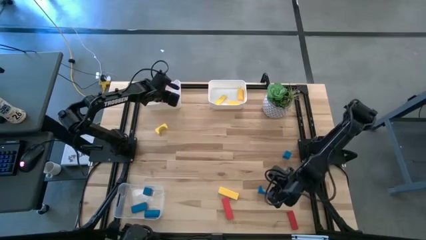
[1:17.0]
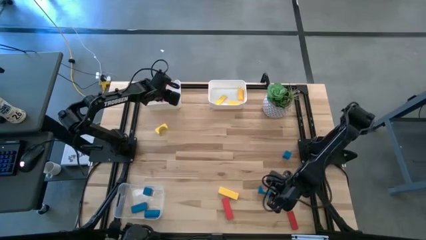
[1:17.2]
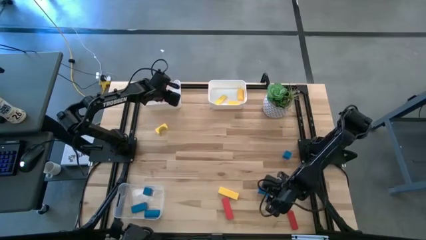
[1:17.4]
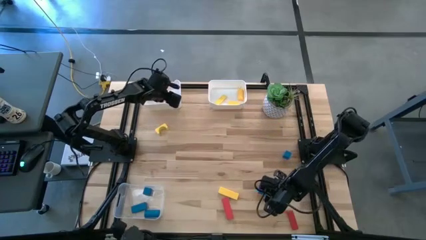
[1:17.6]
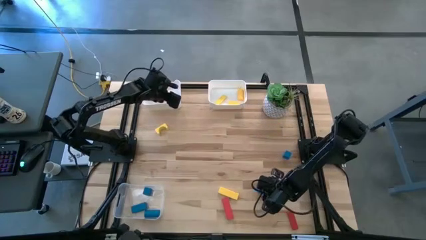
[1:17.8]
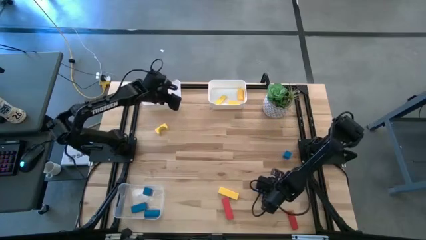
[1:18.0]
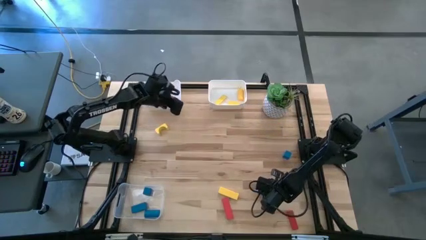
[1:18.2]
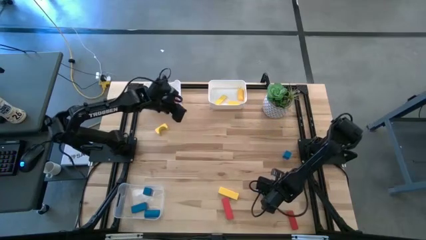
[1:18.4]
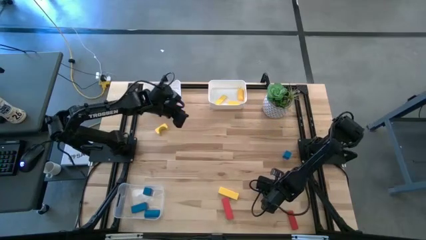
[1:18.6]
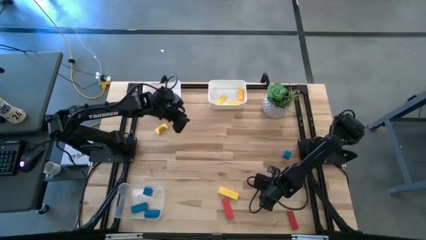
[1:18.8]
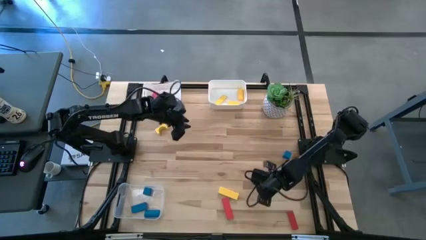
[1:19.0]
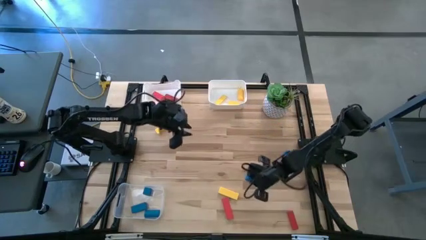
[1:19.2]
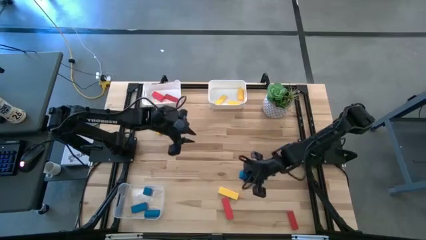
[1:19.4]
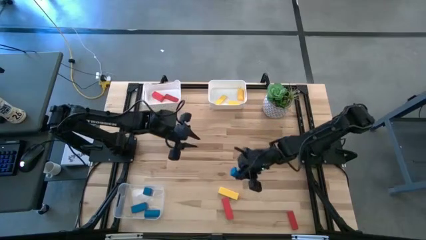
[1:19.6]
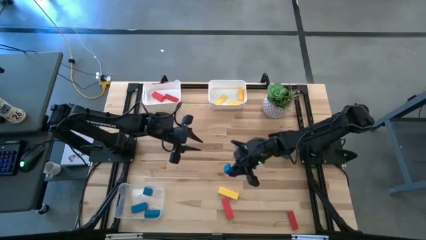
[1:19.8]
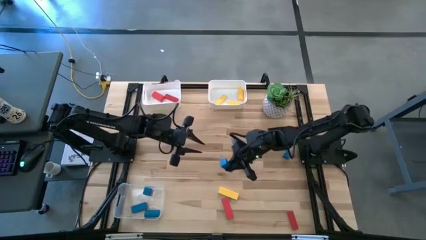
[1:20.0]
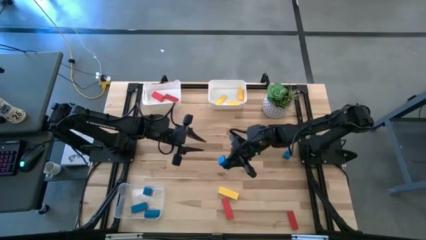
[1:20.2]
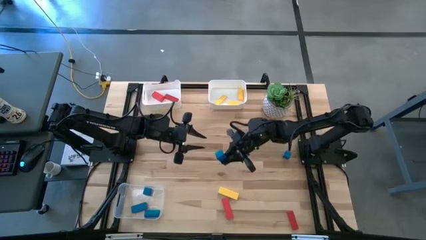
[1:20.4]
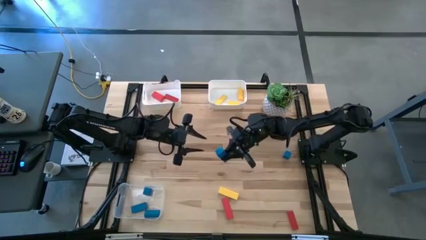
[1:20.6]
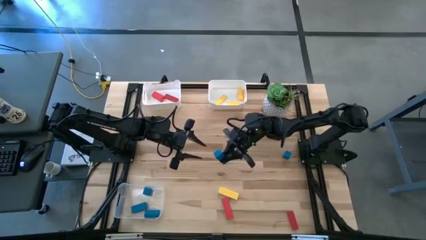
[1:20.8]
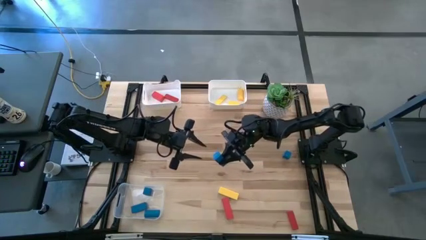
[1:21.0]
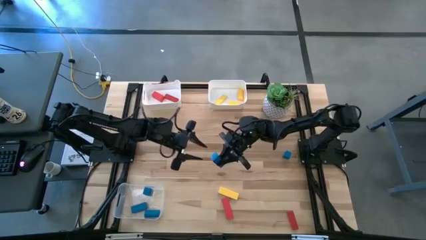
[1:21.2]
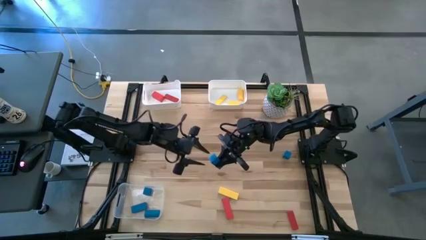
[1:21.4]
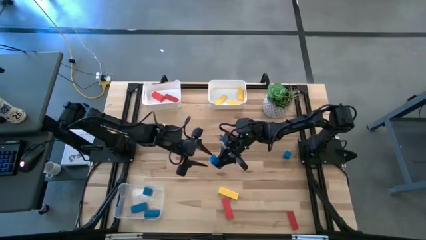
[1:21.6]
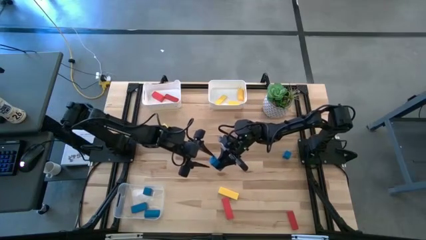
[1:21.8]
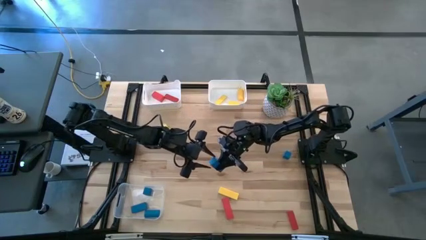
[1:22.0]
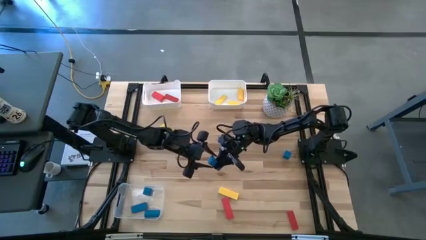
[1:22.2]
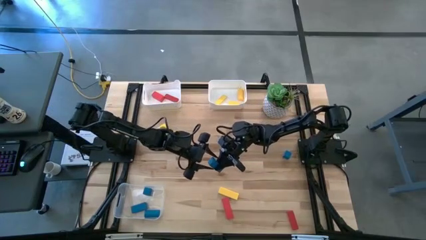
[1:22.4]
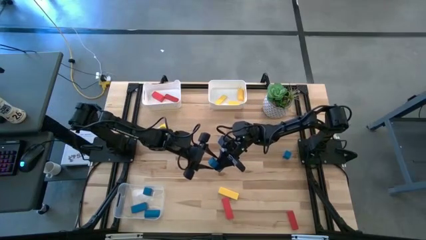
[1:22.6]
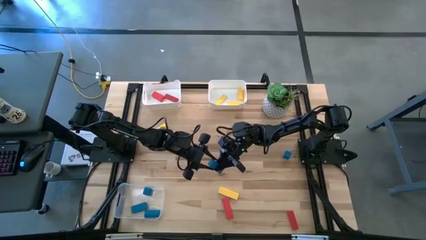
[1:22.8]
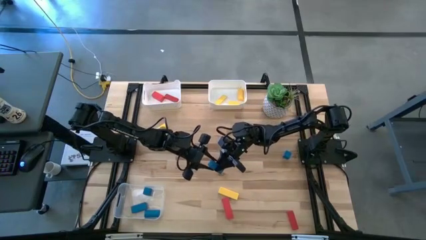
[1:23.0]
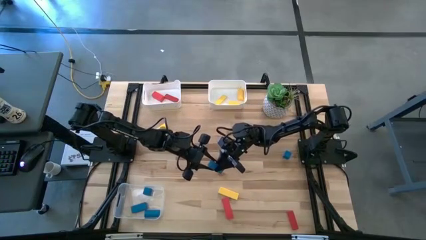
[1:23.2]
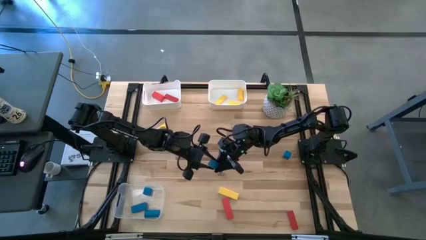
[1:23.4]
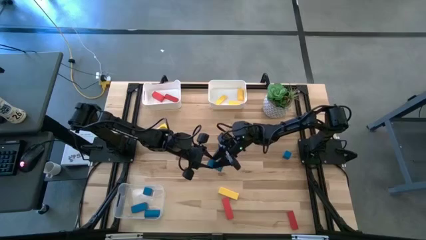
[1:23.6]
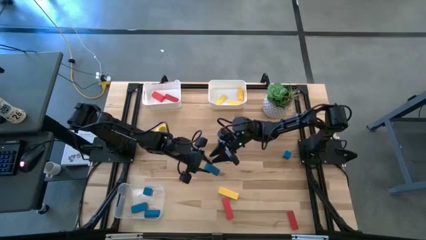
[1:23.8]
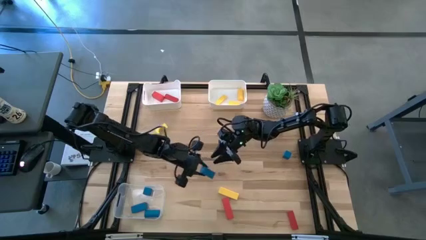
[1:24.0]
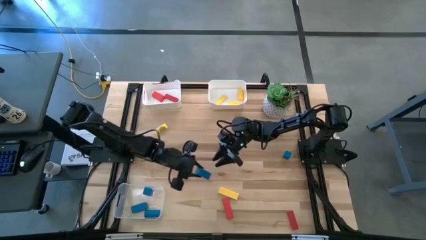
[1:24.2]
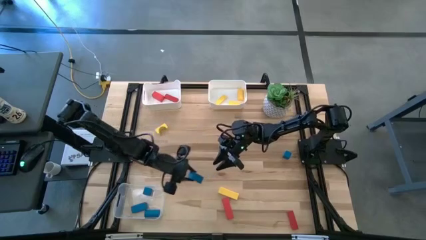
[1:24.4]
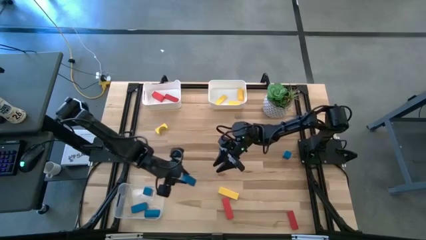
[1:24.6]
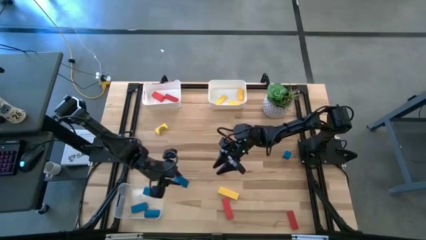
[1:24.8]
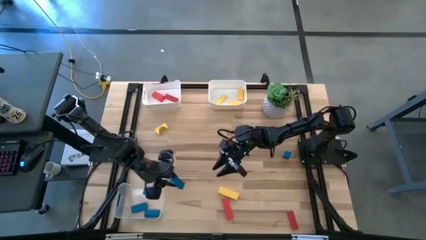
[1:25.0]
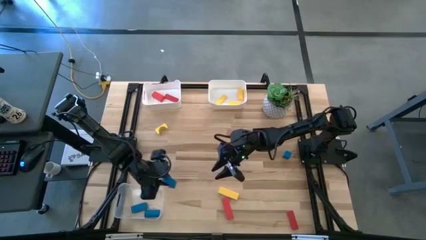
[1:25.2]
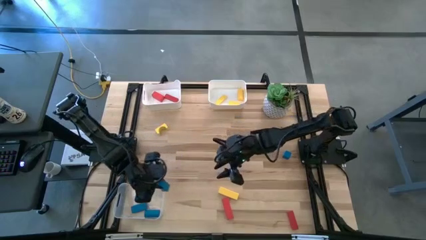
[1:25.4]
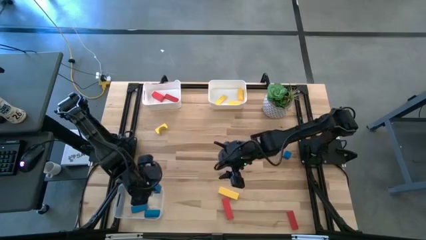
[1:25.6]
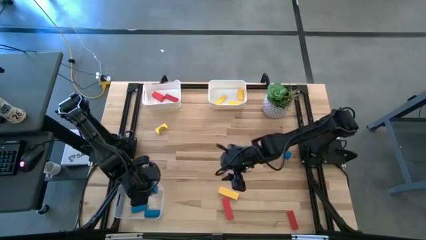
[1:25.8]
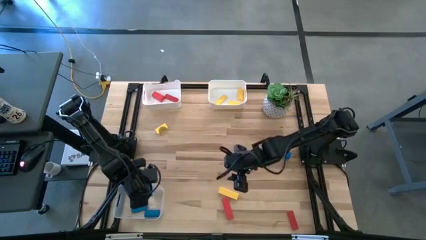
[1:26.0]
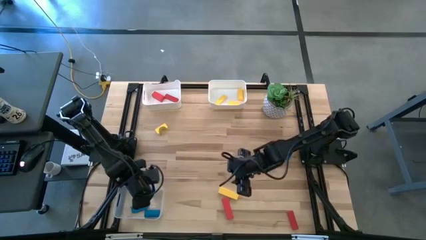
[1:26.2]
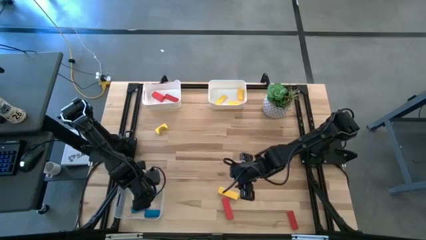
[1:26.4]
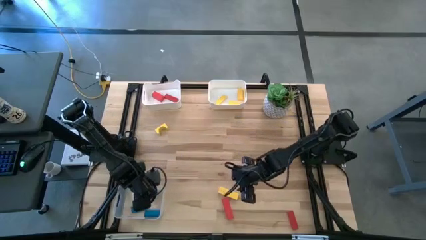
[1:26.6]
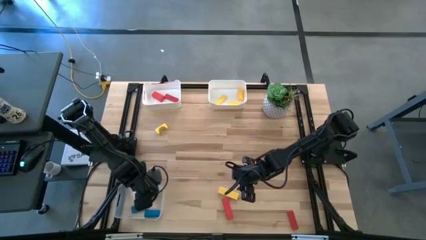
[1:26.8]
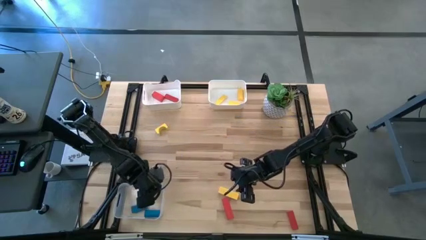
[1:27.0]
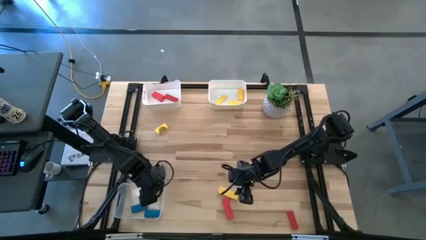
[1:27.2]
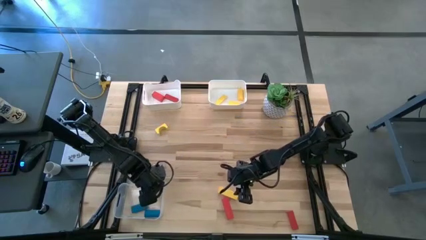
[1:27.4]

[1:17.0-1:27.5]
Task: Sort & place blocks by color
Put the blue block into the transparent bin

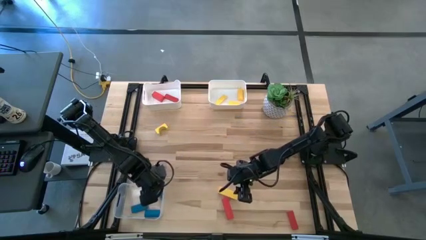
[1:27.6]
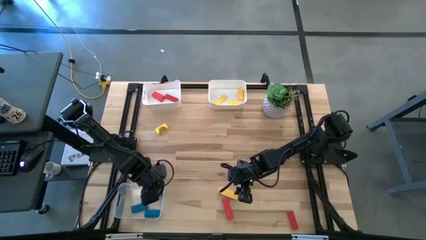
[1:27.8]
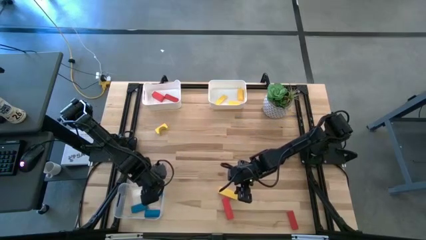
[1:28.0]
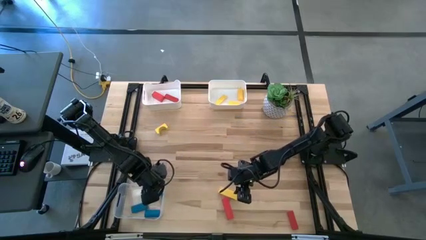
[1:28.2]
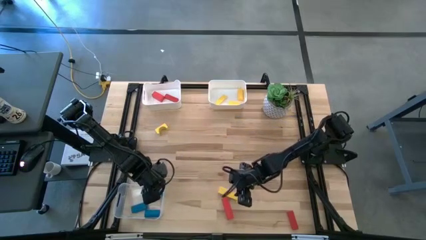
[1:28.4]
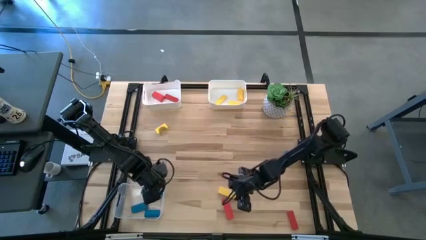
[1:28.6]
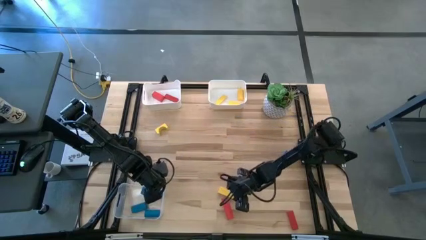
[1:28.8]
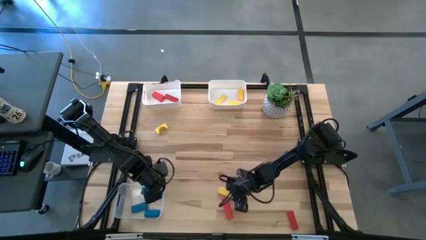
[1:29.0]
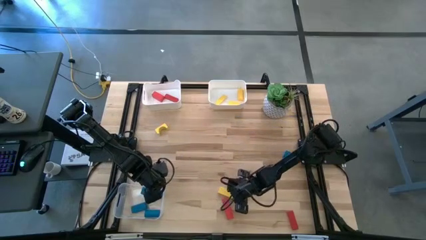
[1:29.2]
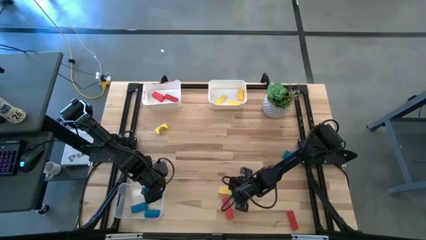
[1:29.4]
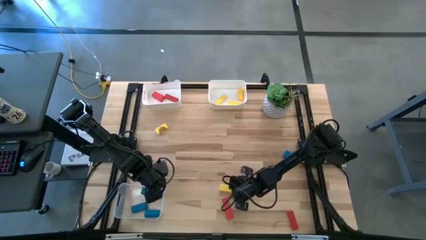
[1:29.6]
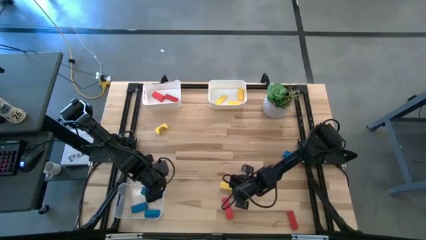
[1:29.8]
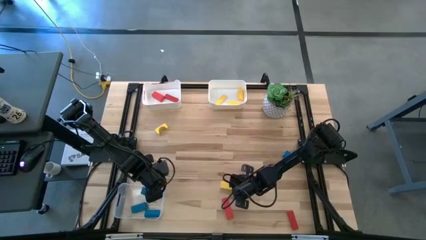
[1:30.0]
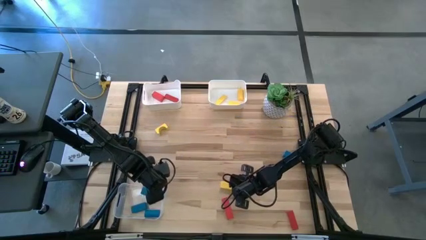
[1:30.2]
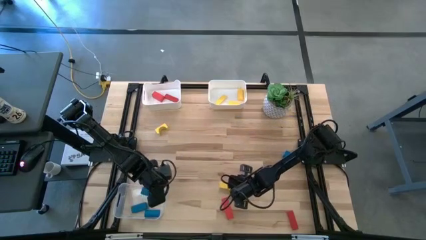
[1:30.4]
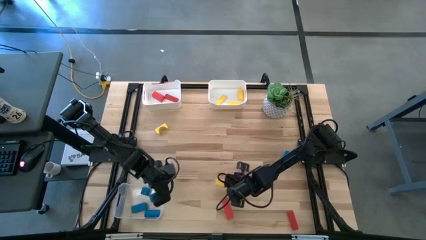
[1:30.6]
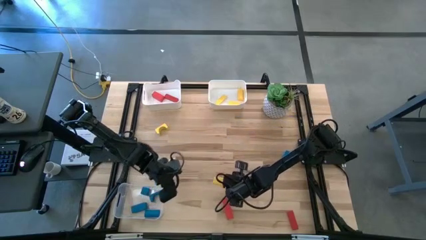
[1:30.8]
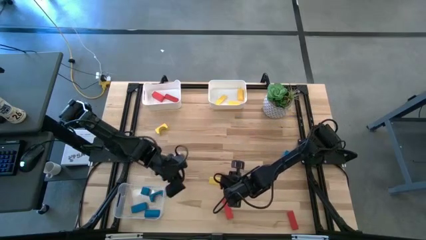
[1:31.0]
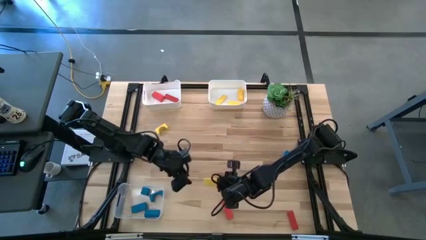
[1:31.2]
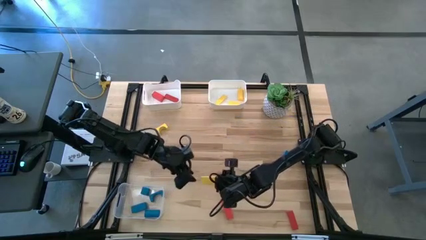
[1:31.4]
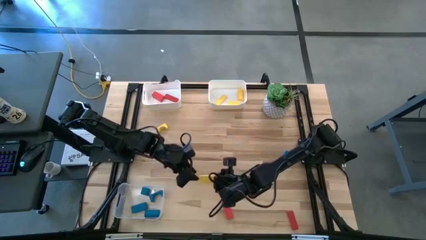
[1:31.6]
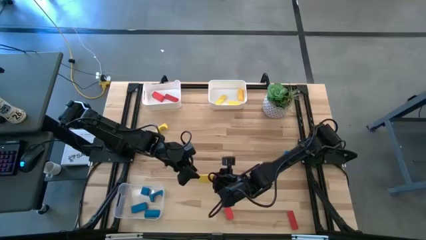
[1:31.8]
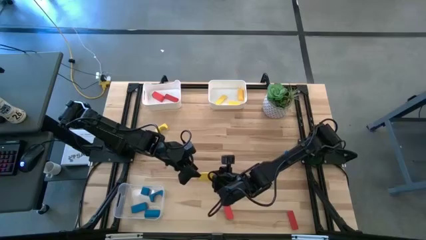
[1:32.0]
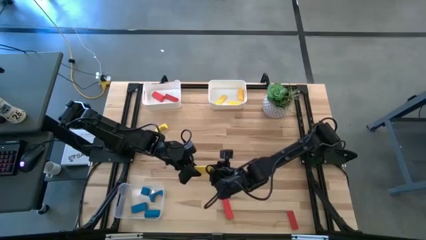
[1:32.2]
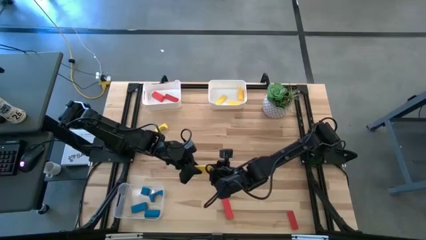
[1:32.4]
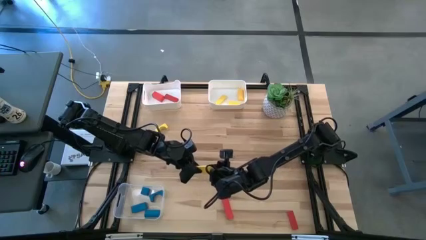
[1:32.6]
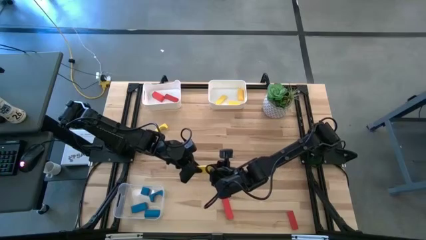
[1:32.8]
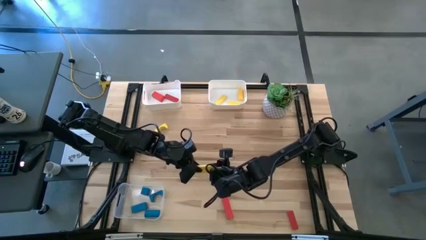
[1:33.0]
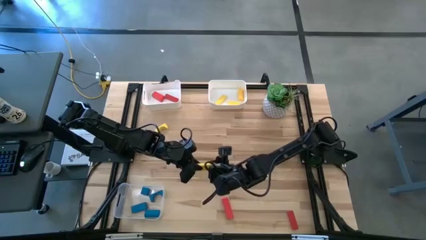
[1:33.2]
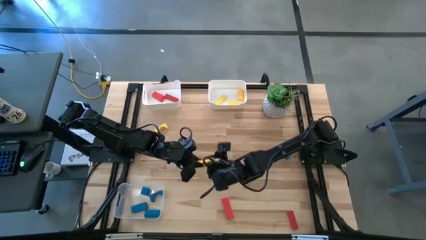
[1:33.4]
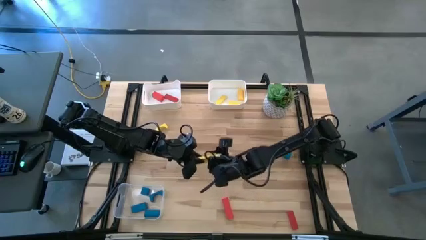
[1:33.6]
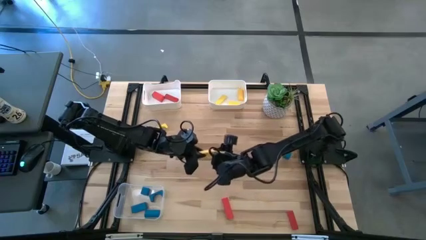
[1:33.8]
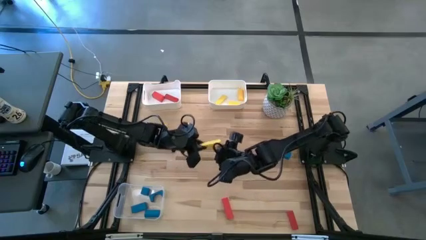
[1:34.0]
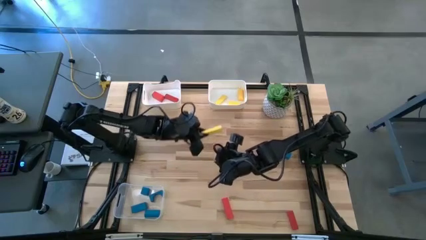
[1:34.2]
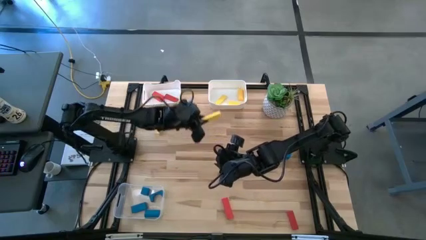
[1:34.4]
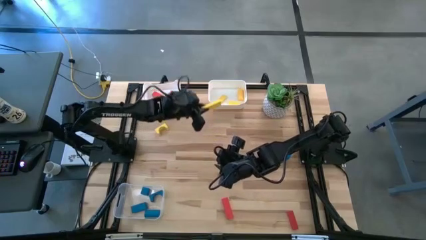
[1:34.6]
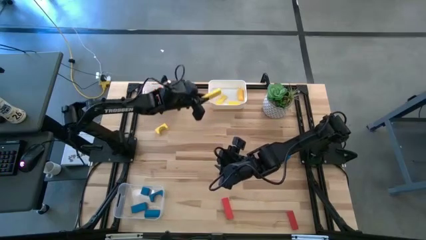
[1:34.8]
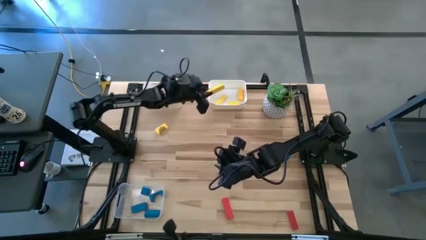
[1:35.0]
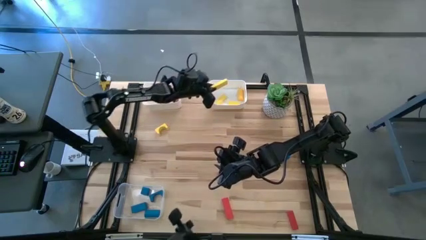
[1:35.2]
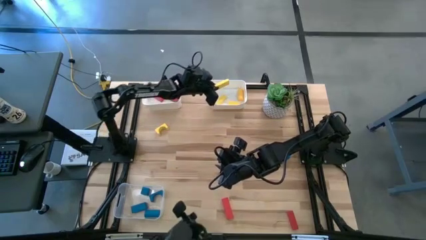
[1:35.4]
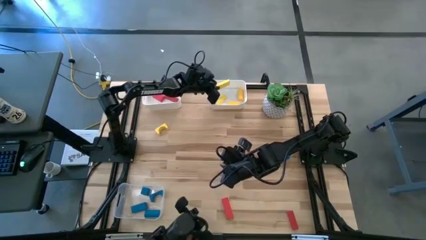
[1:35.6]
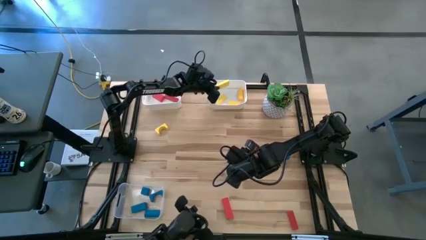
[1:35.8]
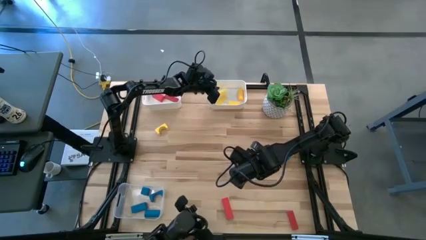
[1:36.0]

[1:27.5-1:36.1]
Put the yellow block into the right white bin
